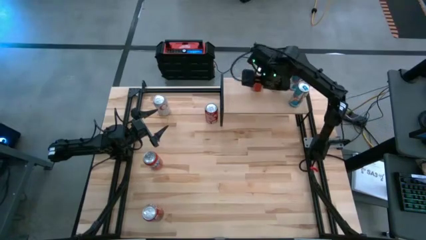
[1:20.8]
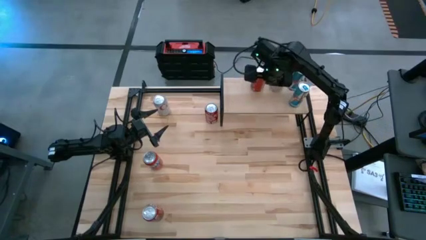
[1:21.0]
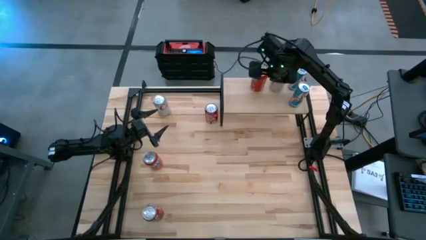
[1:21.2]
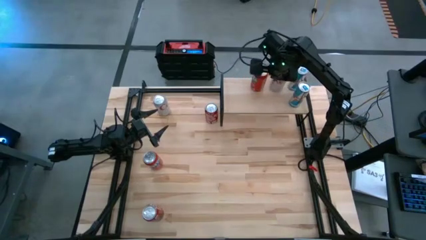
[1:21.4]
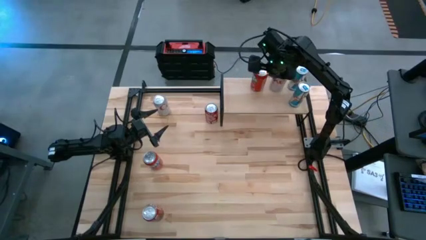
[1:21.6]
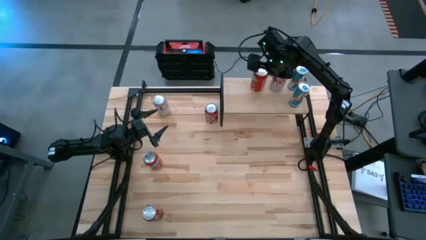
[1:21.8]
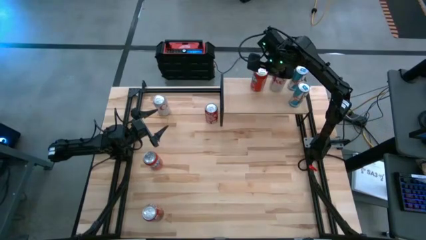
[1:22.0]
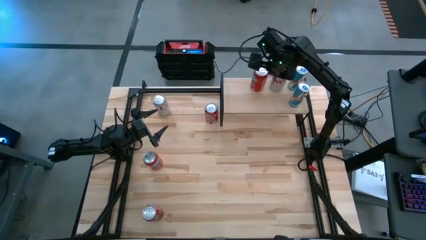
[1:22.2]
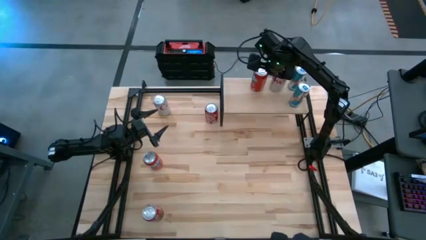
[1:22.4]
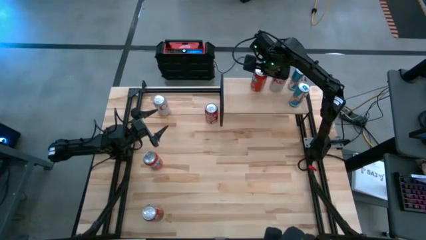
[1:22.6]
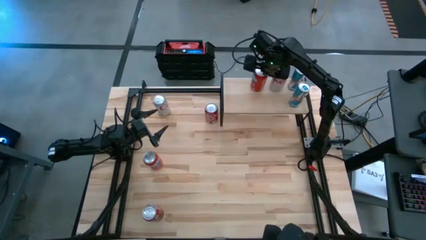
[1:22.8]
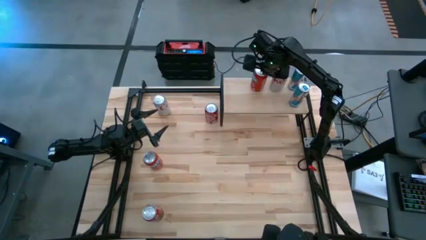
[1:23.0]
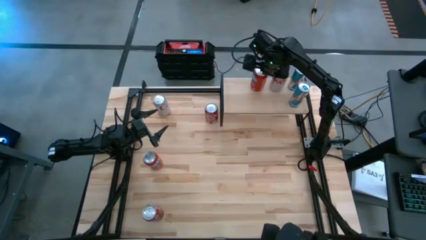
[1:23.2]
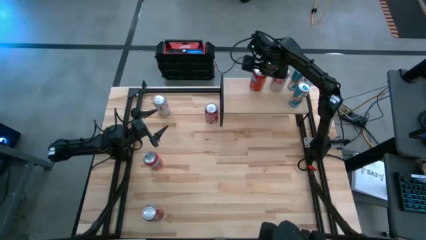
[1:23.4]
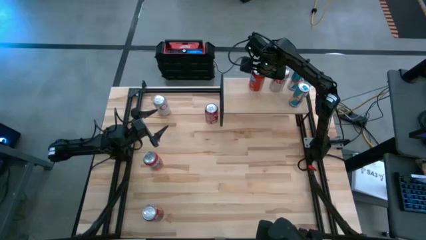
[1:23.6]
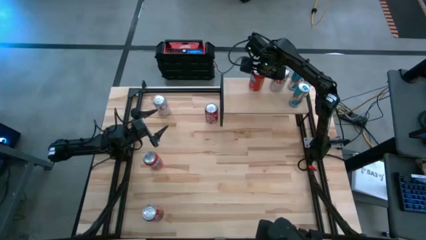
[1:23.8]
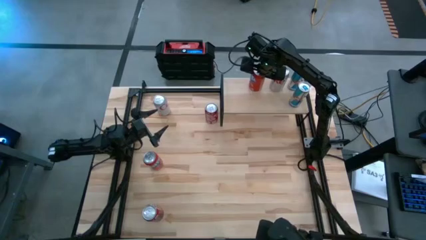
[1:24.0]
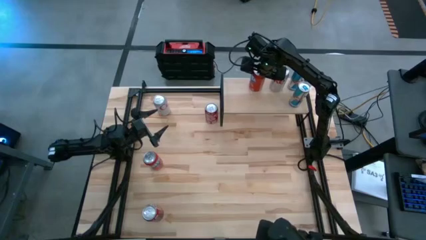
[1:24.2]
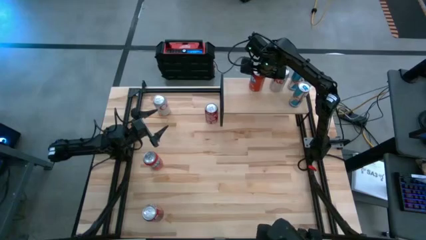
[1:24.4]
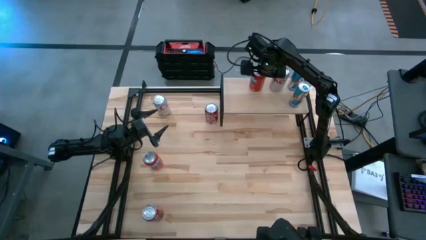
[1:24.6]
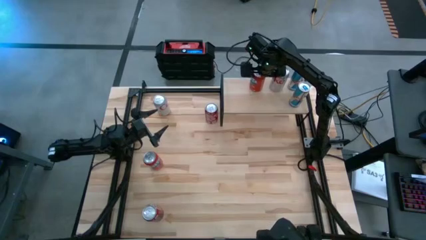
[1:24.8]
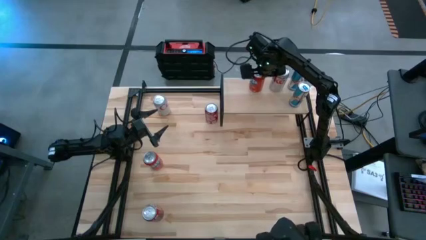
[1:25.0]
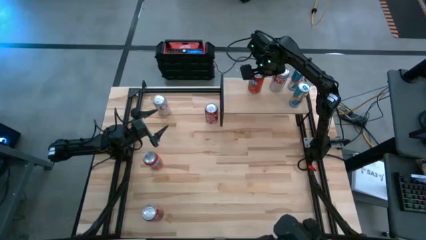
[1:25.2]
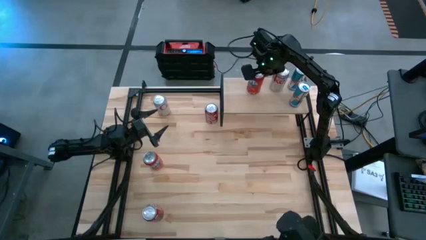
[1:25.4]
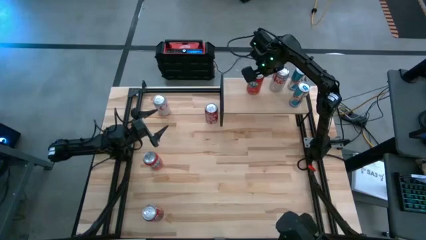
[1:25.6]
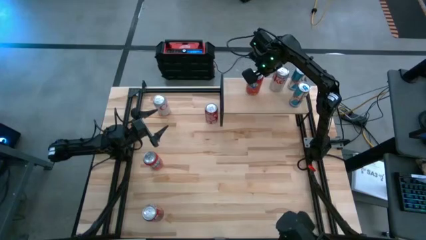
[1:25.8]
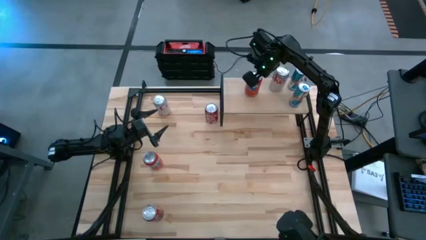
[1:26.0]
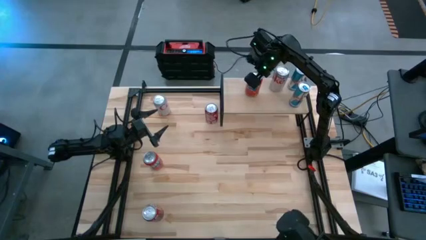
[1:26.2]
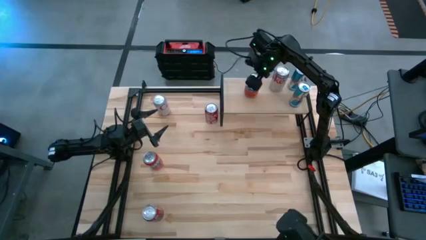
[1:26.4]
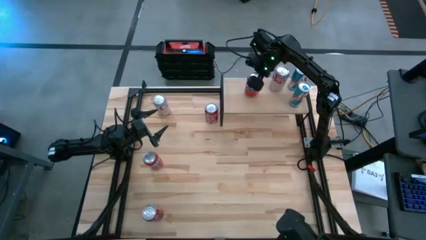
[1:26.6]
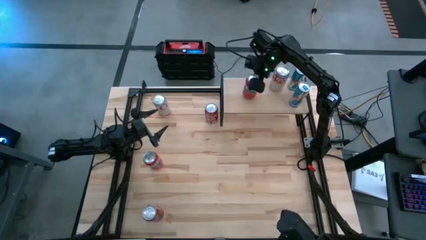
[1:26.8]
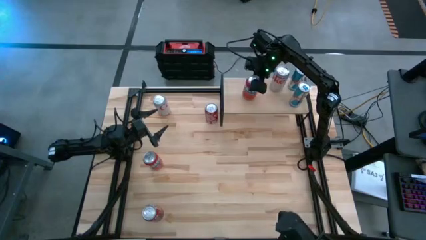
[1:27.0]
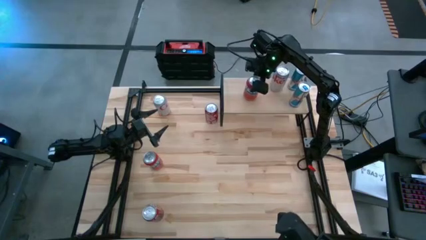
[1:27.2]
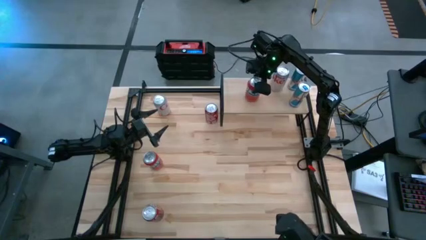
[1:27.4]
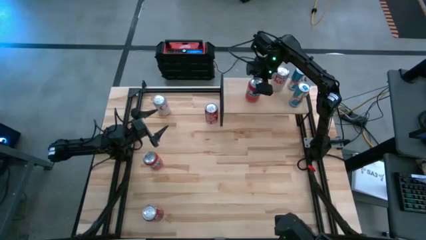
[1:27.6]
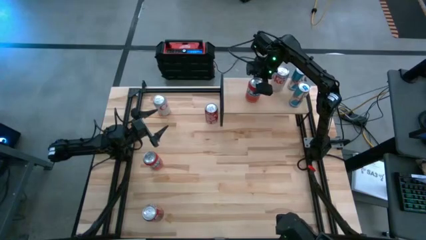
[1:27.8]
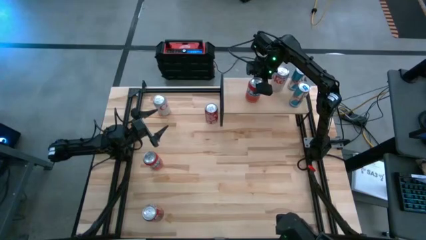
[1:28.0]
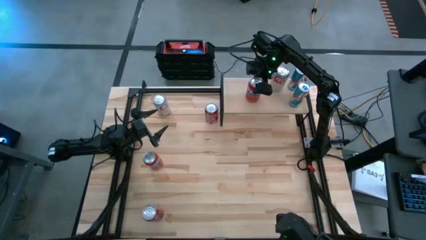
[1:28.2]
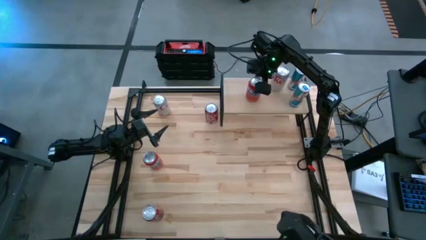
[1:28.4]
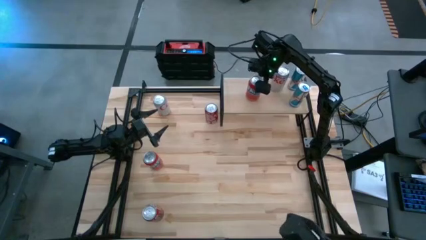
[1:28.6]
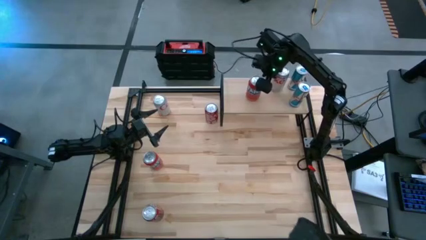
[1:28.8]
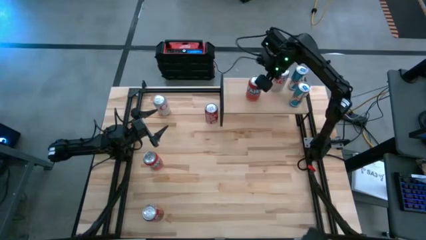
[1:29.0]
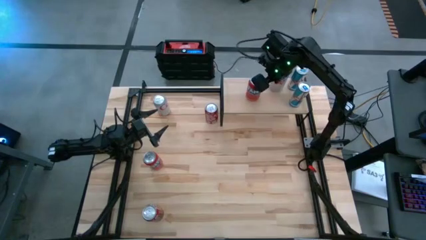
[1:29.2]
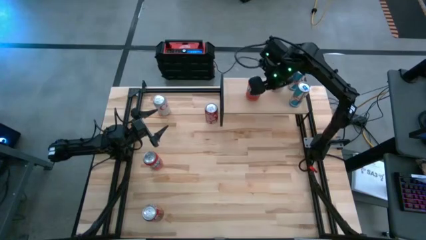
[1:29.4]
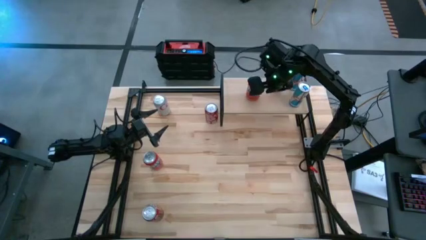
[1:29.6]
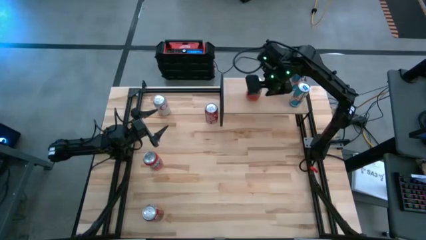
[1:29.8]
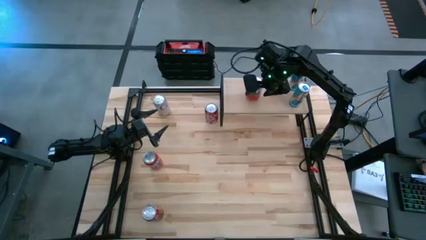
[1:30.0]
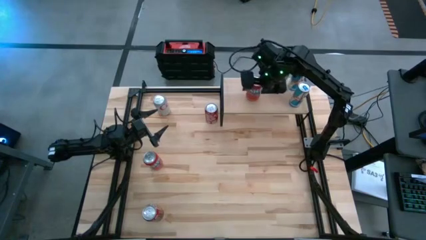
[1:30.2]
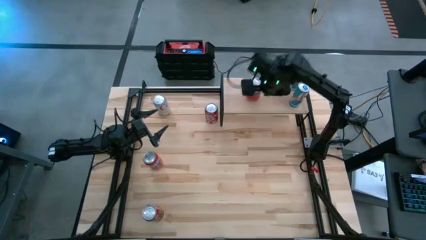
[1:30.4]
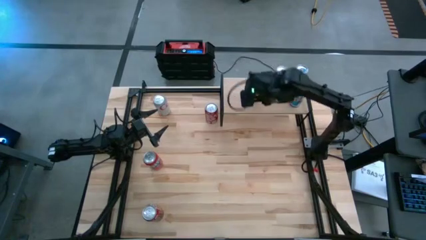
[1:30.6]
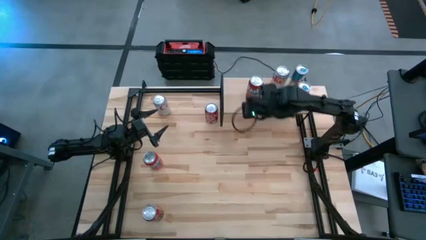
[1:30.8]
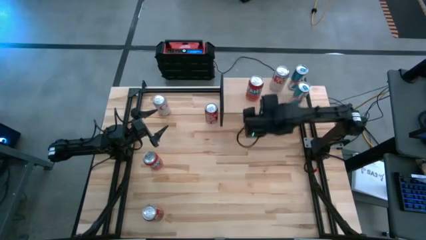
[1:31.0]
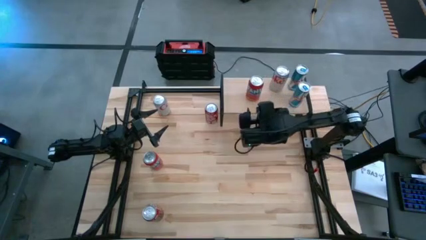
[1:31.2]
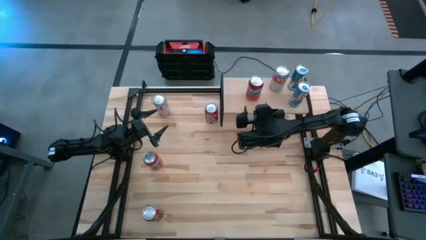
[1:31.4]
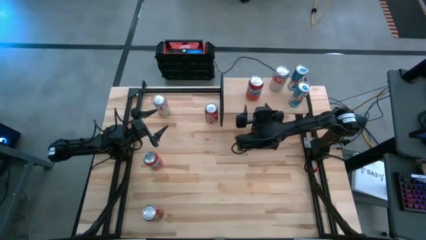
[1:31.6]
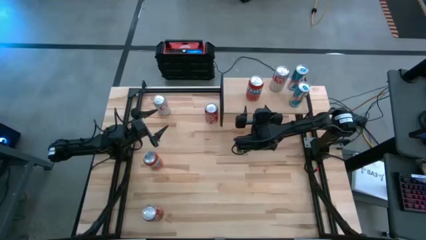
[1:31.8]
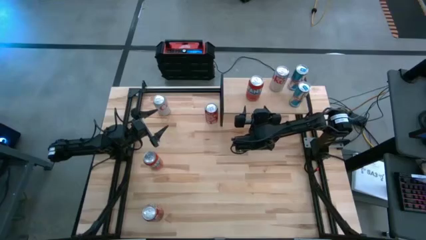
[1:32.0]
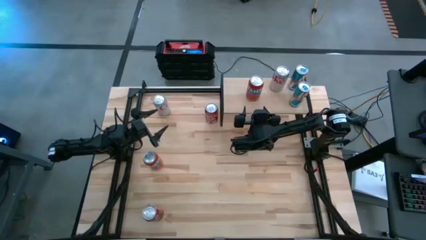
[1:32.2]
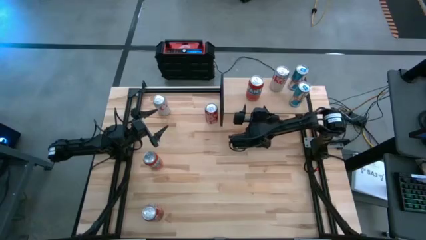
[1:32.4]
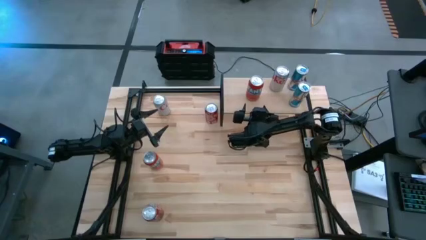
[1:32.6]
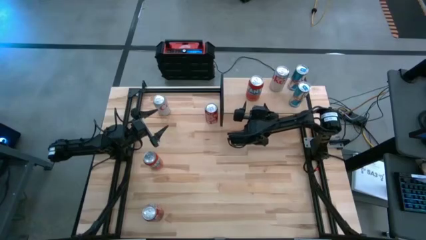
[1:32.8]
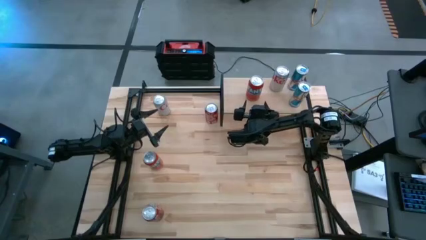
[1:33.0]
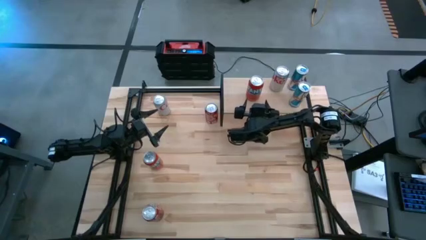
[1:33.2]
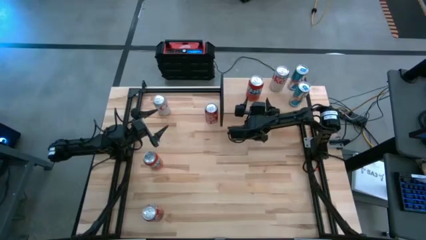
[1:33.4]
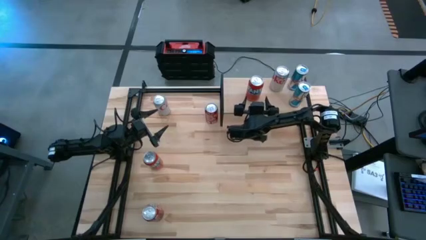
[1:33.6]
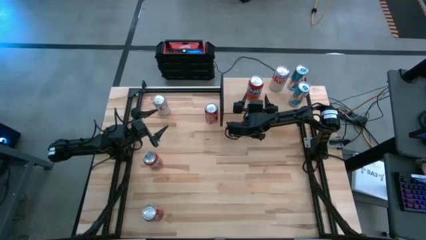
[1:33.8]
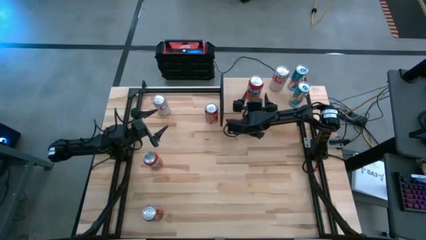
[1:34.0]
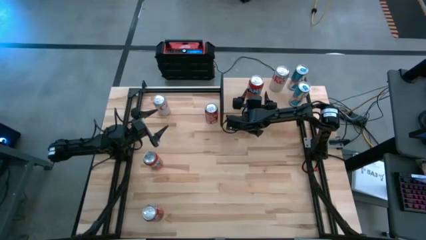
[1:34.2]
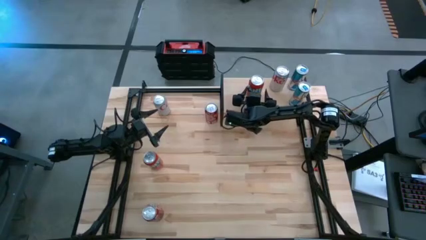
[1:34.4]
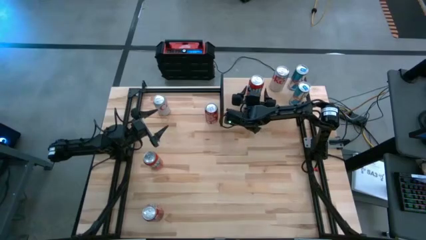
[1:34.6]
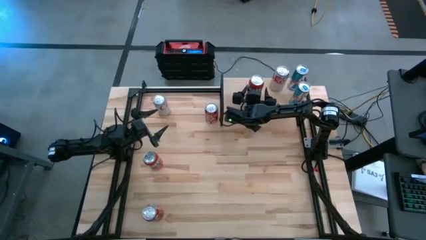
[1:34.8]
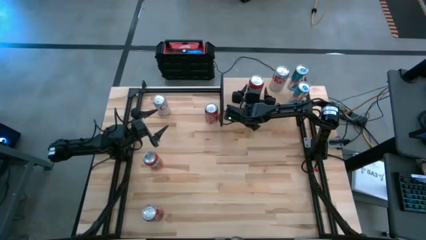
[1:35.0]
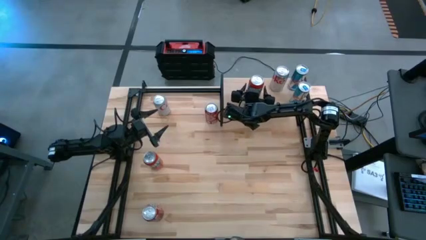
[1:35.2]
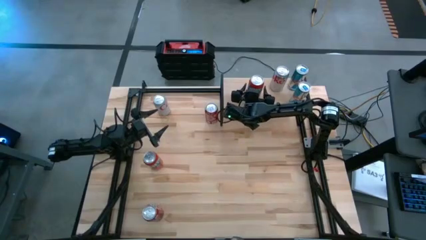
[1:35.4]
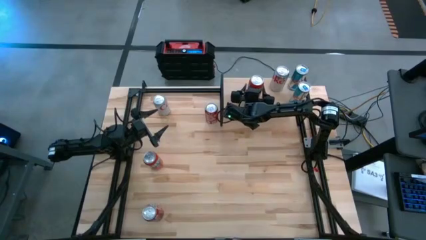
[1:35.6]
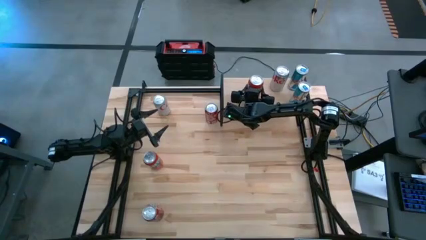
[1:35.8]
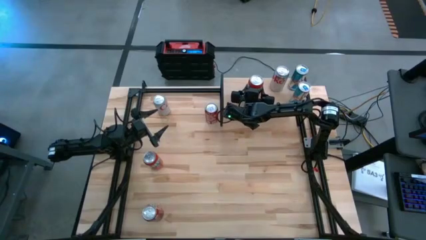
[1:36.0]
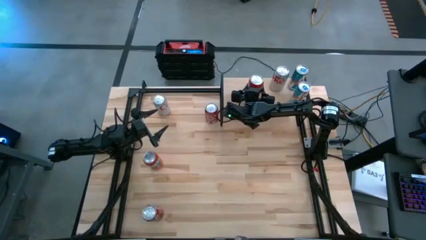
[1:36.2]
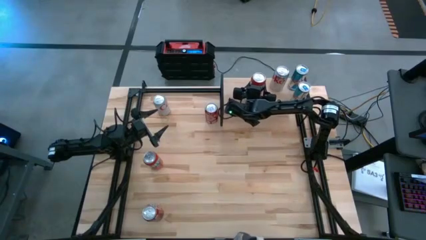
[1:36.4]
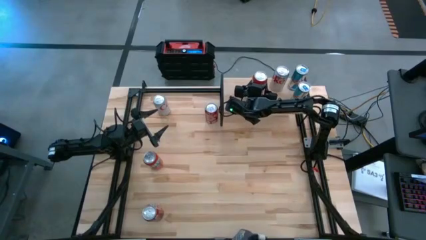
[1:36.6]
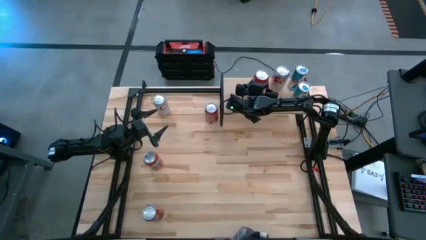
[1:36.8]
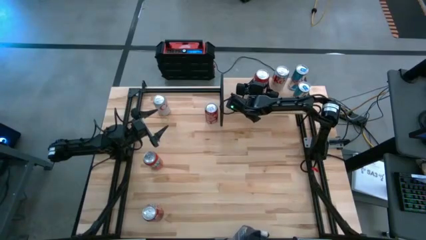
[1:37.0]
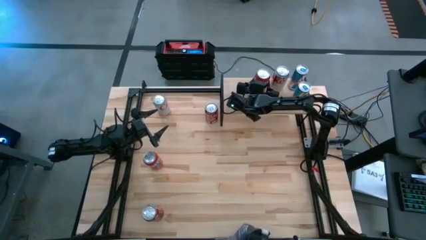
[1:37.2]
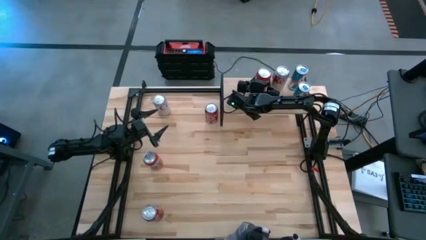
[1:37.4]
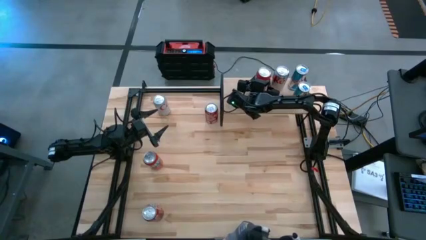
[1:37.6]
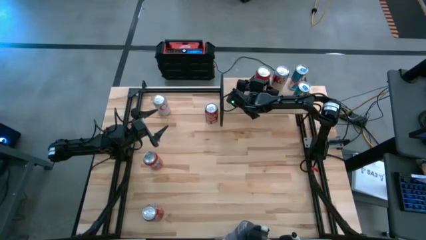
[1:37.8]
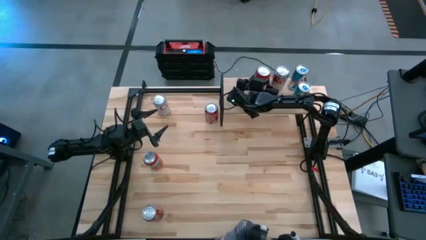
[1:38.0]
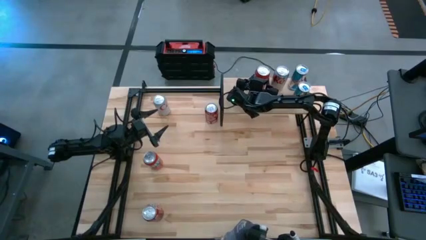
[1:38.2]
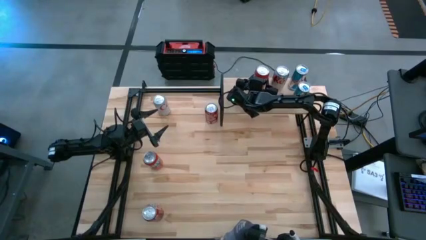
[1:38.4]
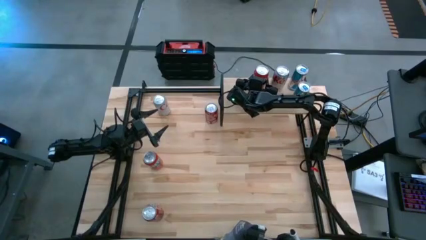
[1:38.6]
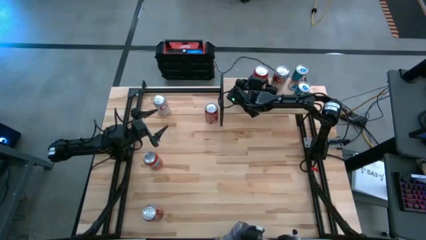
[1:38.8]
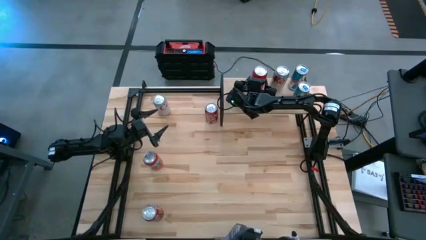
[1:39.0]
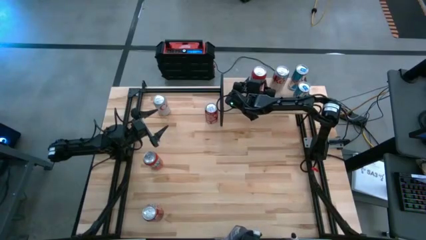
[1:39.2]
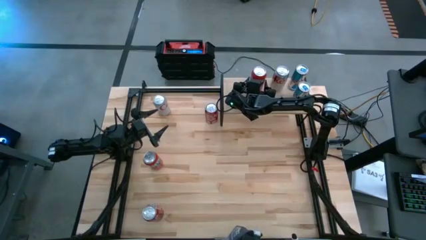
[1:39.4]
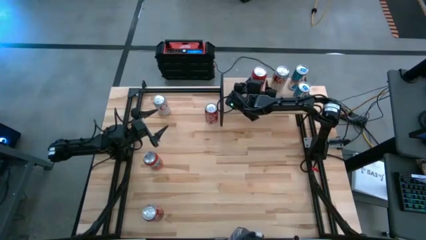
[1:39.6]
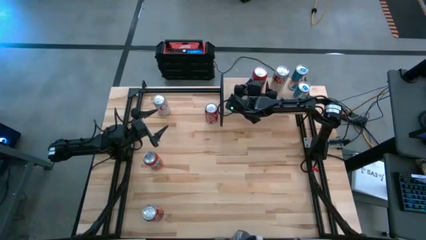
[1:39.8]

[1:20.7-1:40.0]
Task: Place canned beverage on shelf
Put the bottom red soda can on the shelf
